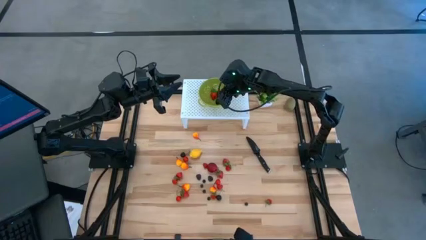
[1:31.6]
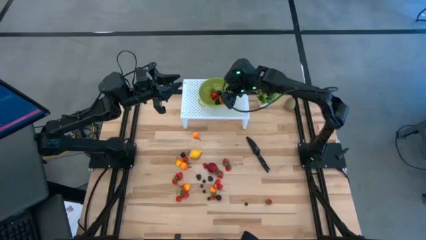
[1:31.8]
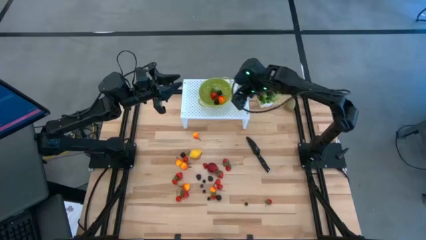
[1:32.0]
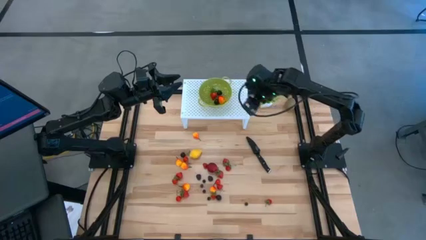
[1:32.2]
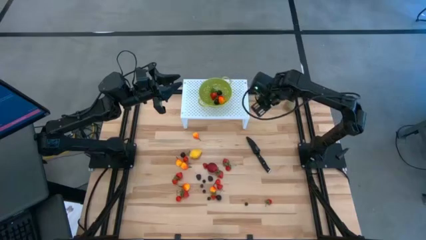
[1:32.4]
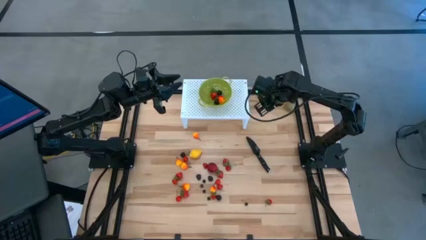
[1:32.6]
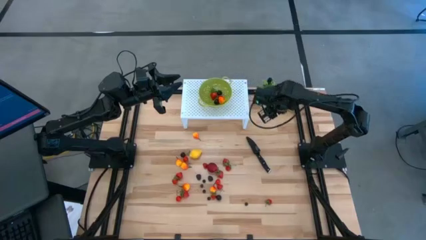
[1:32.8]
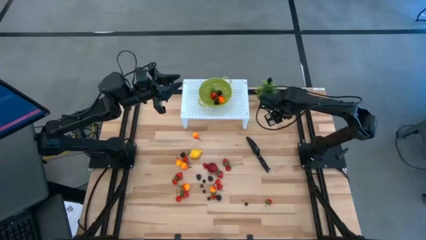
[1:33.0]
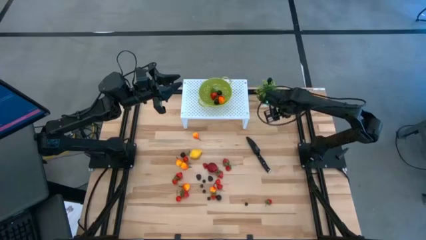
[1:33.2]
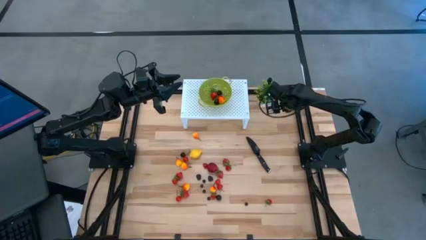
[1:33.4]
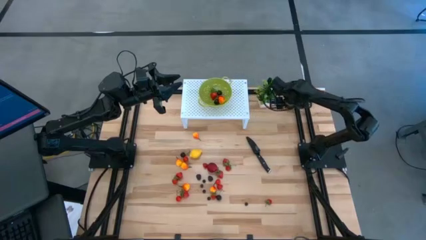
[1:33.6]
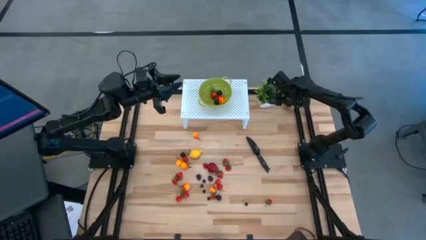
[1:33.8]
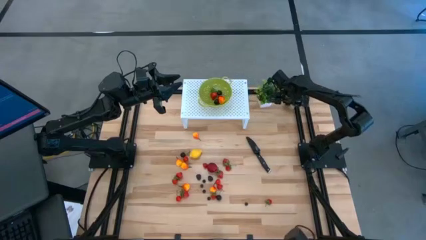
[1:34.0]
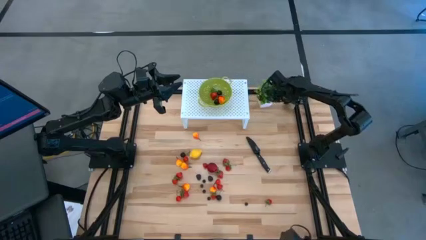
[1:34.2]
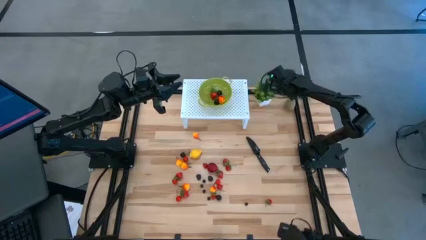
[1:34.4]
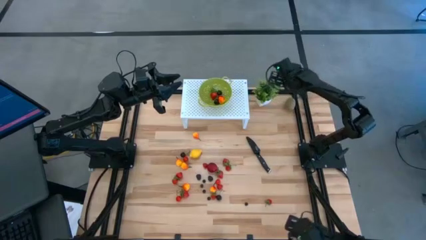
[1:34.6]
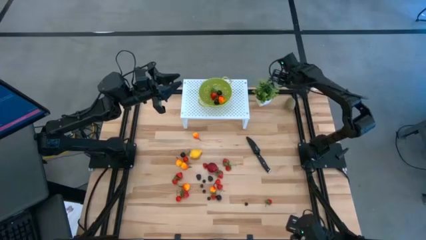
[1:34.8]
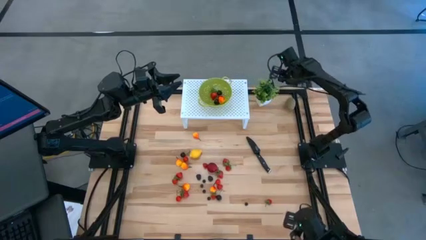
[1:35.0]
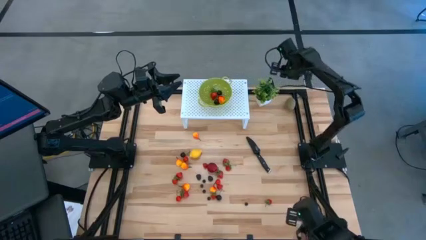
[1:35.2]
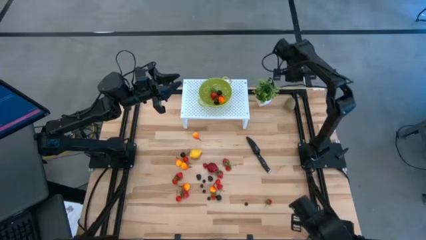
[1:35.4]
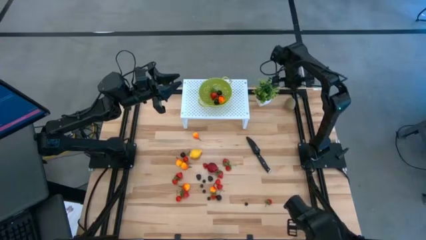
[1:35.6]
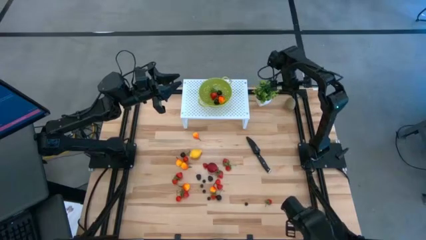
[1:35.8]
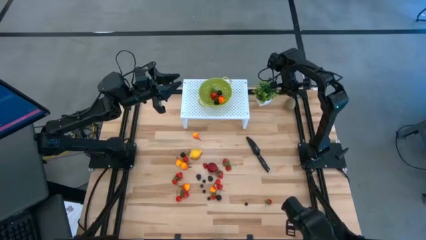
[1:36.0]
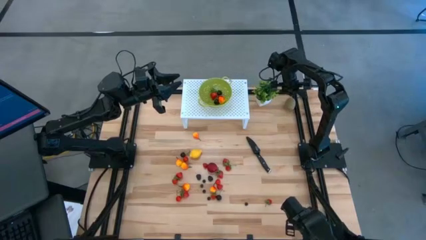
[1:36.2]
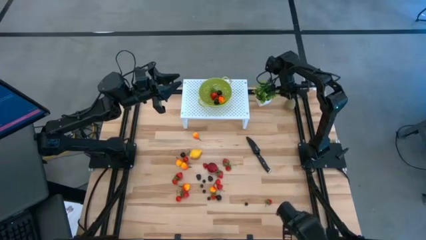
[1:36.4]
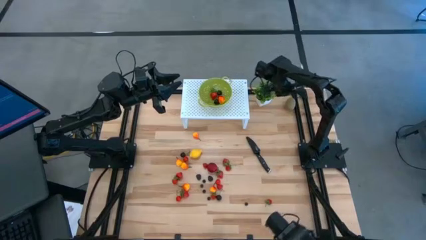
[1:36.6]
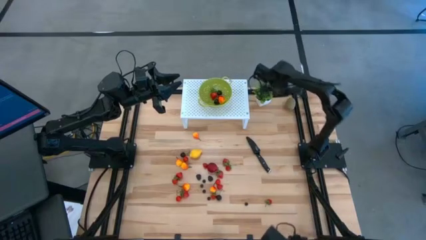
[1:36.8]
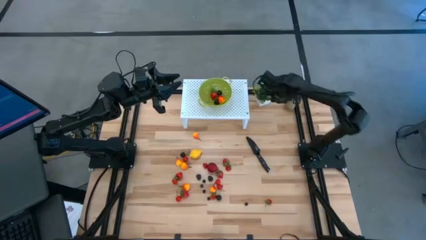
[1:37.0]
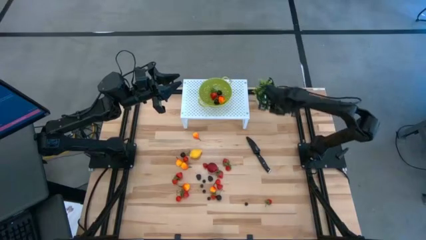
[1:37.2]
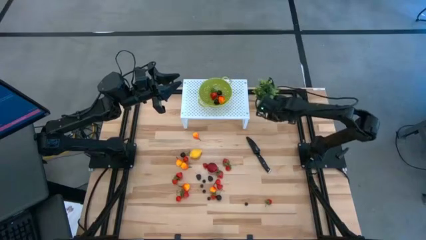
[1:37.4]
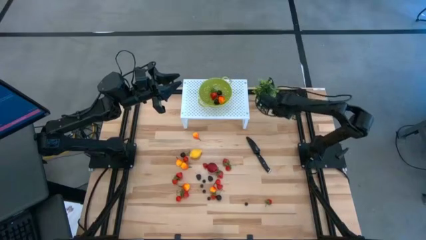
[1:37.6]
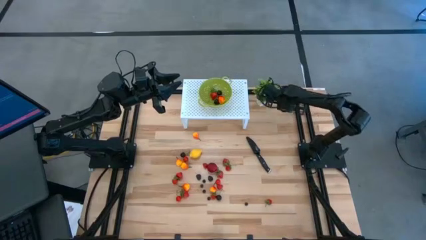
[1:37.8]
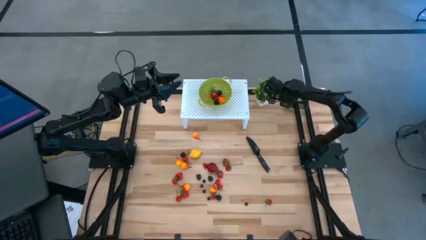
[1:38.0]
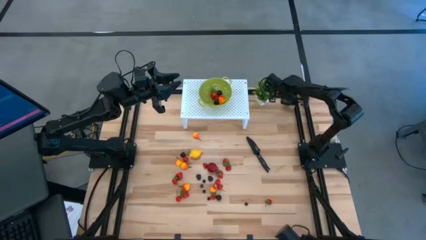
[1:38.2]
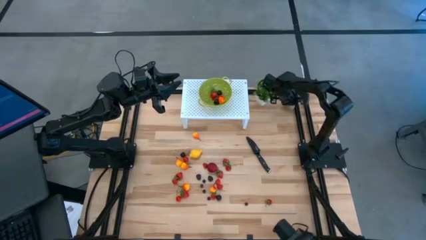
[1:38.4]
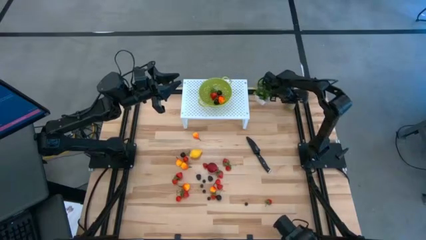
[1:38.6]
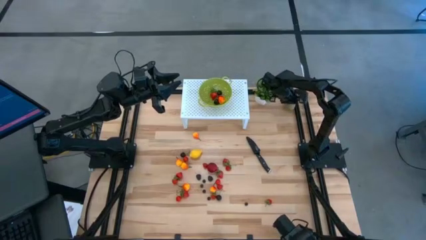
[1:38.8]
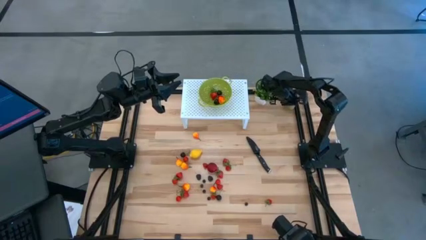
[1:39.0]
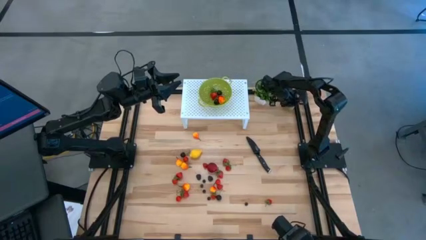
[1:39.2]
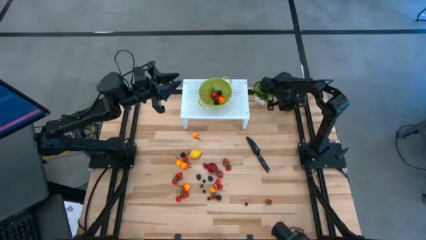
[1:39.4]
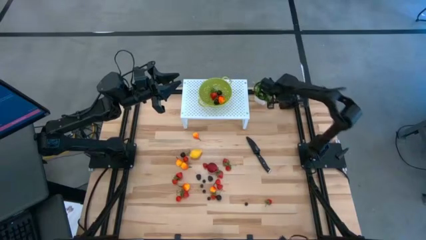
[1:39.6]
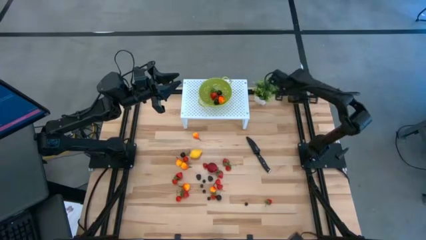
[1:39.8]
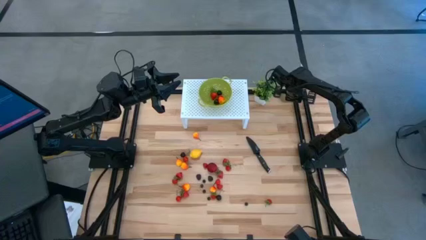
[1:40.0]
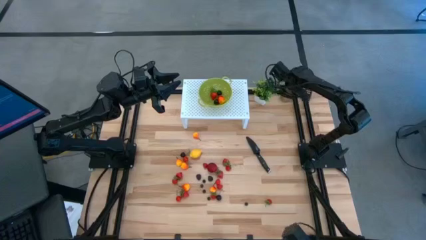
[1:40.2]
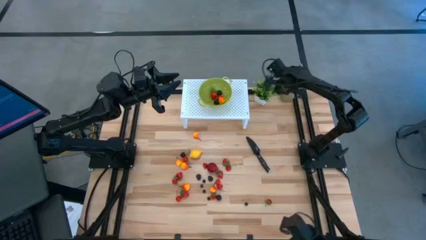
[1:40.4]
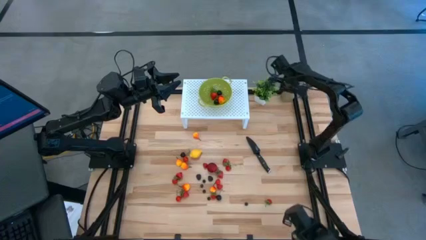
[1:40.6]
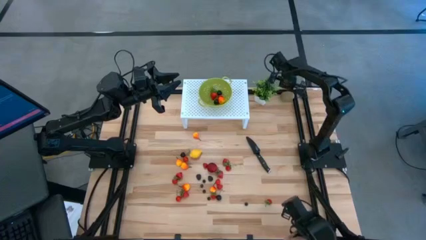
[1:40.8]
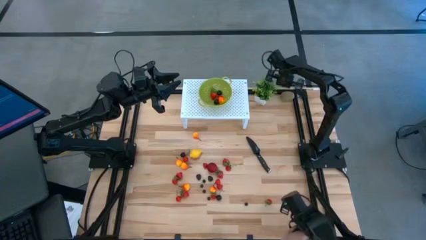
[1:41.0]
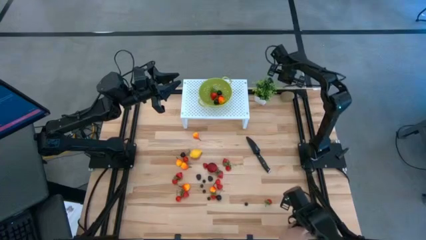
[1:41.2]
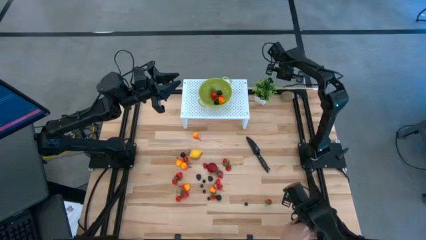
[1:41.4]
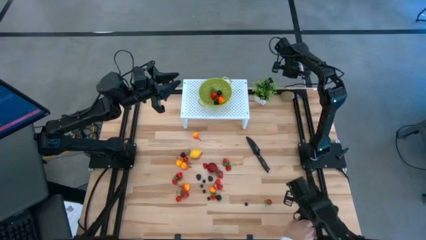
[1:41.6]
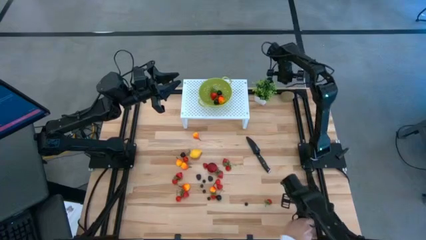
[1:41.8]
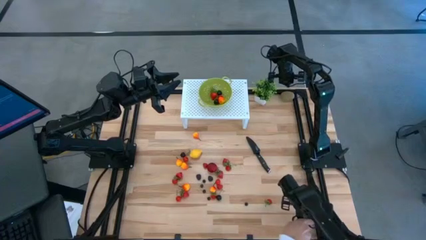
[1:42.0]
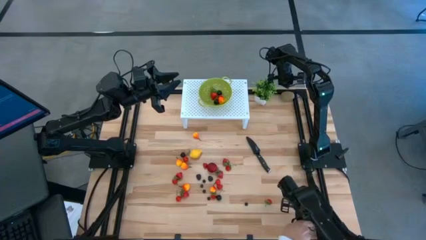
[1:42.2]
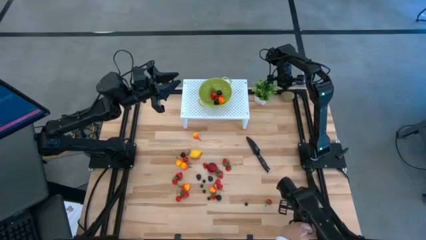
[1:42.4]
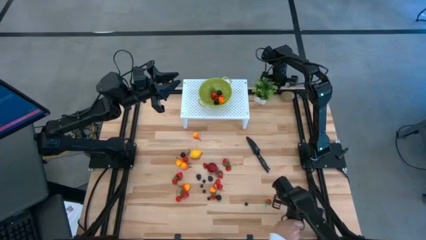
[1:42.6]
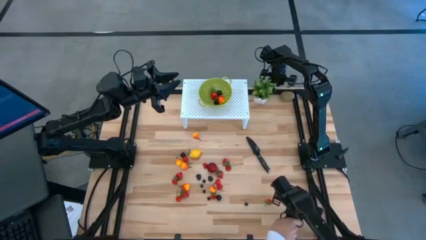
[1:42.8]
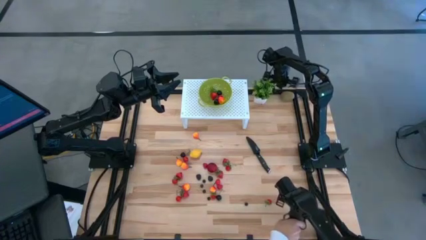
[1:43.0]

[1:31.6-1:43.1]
Task: Pick & Place Fruit
Put the brown kiwi into the green strainer bowl

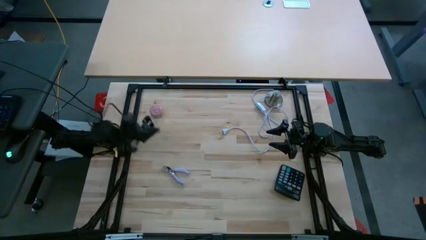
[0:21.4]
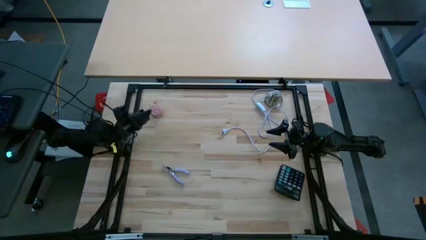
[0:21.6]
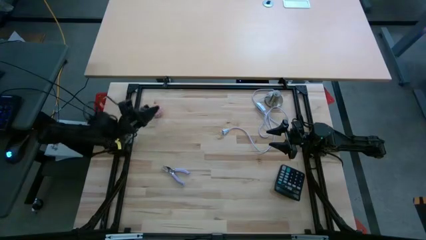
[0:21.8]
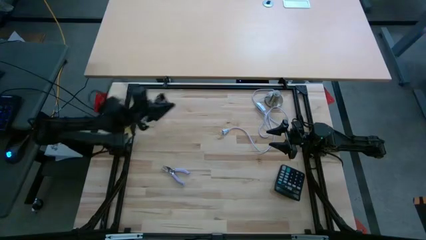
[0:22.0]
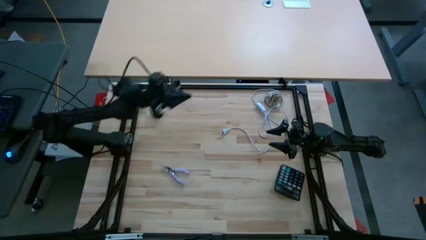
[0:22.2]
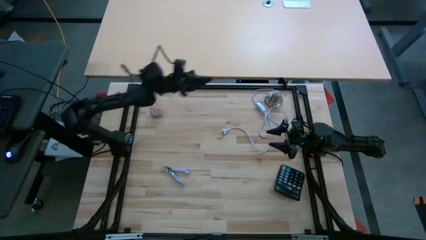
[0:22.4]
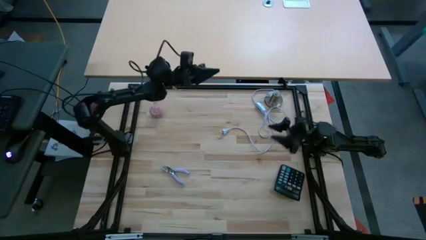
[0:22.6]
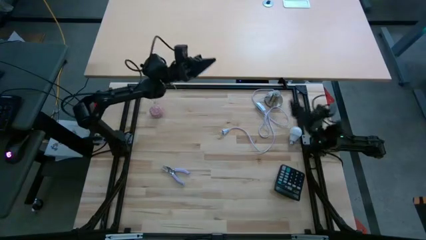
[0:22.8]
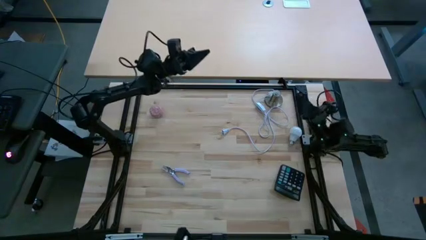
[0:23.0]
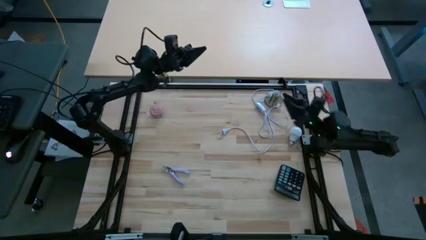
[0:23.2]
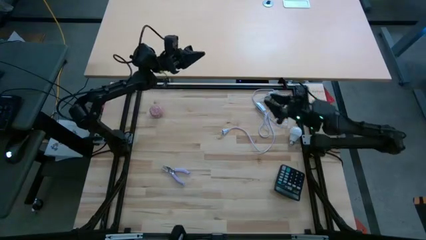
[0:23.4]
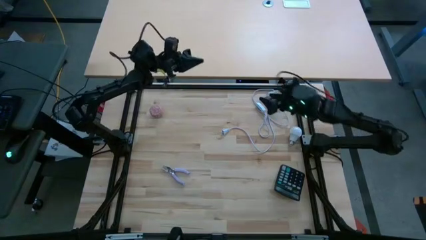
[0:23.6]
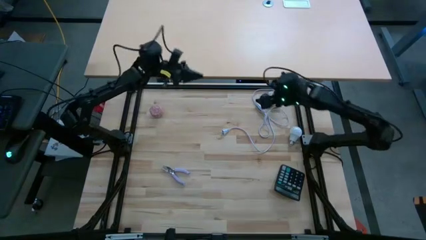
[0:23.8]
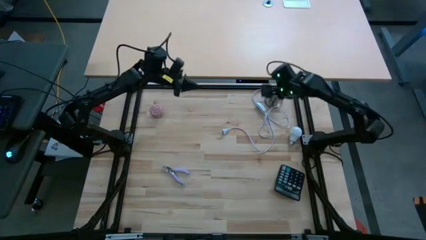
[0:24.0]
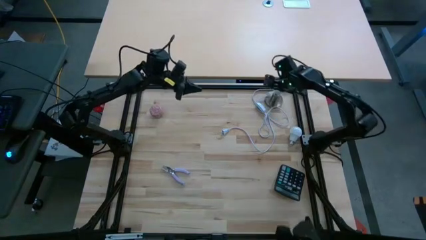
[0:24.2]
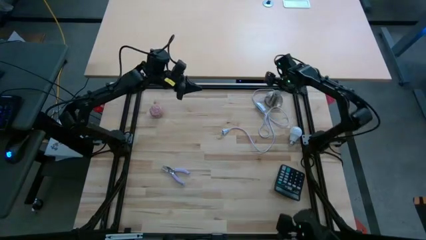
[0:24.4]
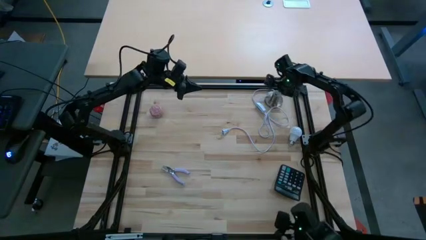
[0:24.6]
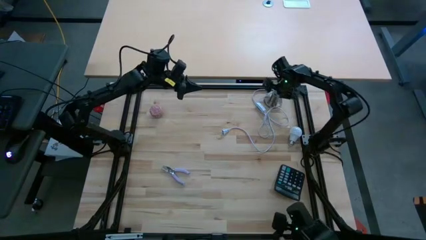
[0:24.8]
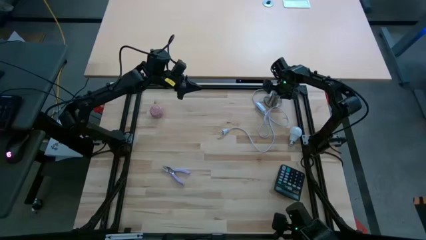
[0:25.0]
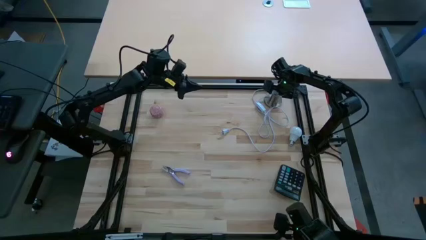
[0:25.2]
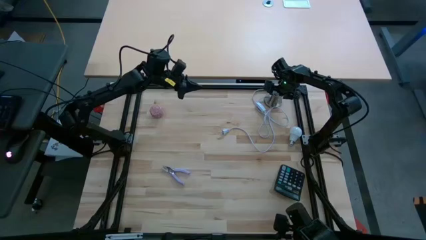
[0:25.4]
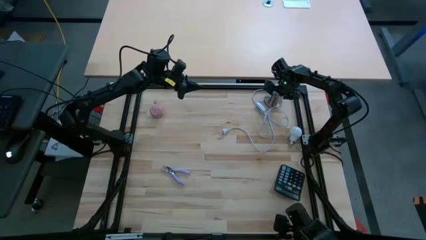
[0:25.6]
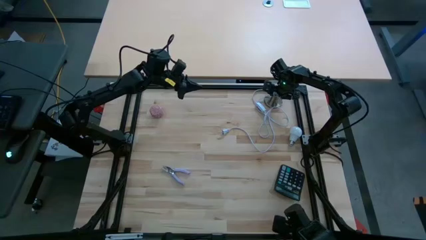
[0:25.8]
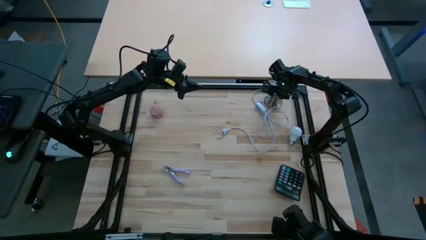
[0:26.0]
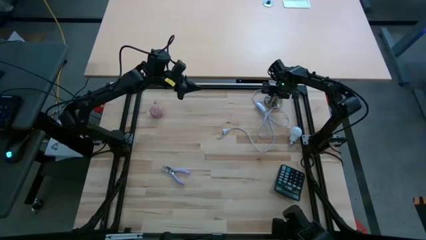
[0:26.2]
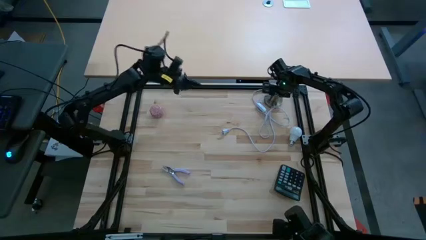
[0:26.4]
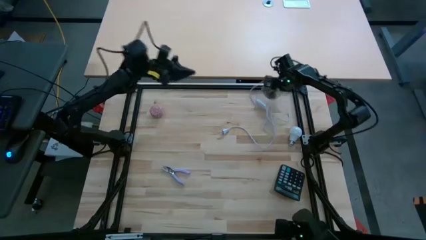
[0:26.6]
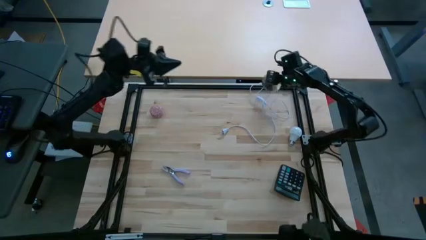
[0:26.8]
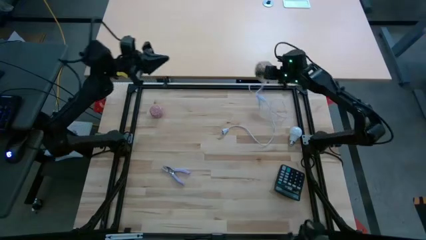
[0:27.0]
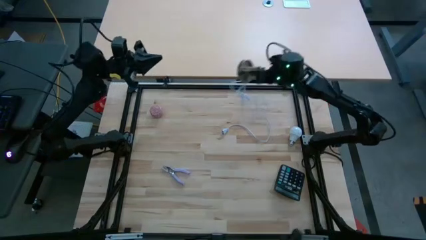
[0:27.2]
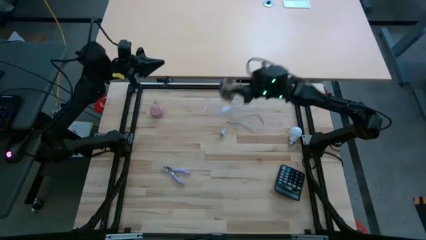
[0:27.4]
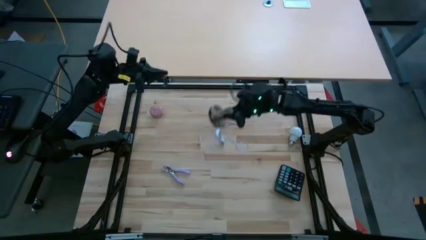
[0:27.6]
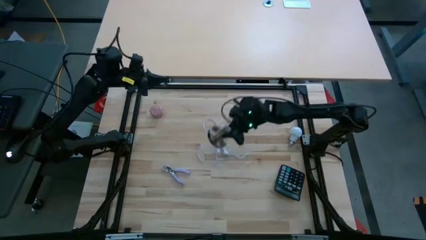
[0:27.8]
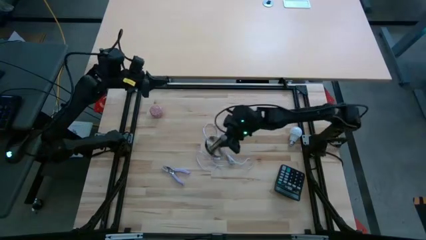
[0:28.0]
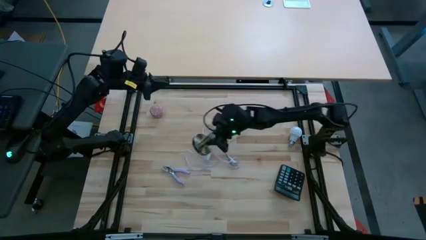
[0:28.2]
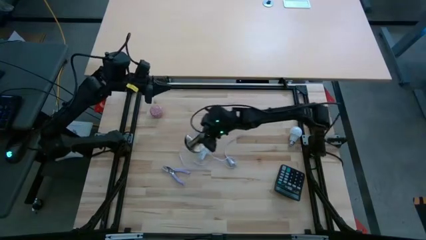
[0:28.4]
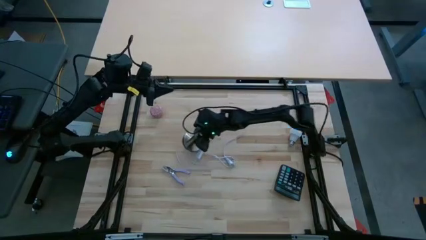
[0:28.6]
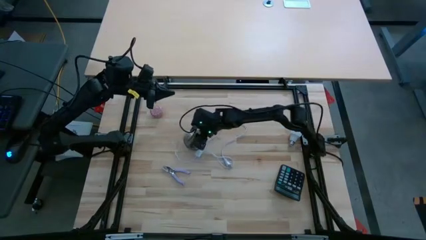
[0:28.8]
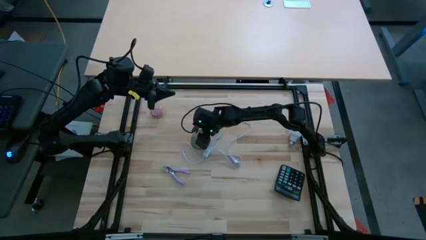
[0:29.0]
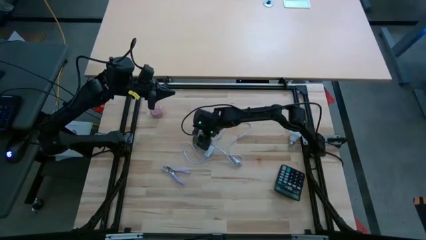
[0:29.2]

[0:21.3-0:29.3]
Task: Screw lightbulb
Move the lamp to the center of the table
